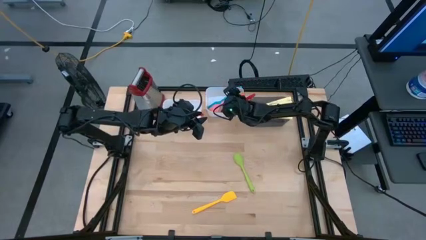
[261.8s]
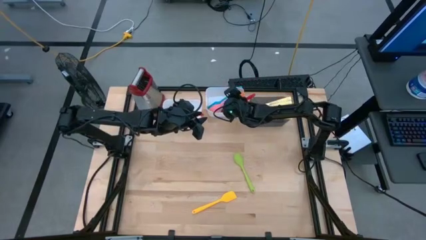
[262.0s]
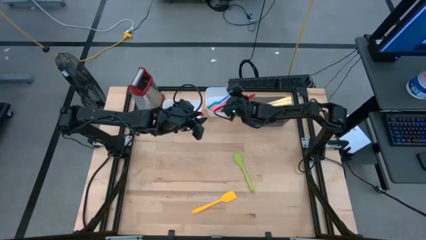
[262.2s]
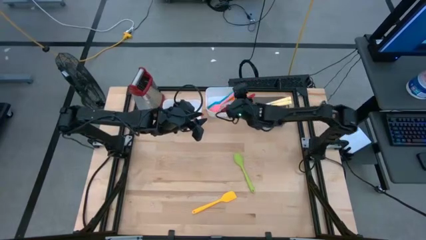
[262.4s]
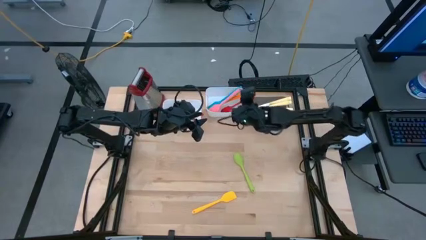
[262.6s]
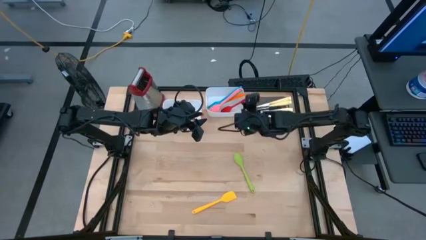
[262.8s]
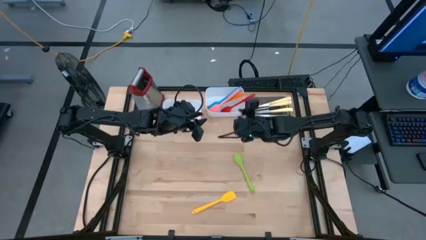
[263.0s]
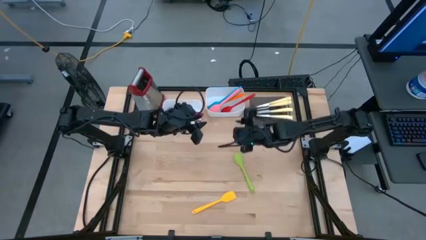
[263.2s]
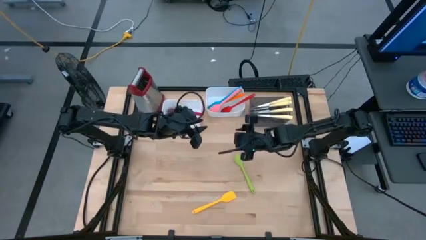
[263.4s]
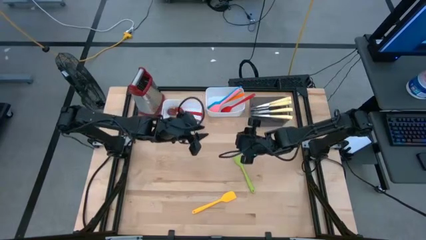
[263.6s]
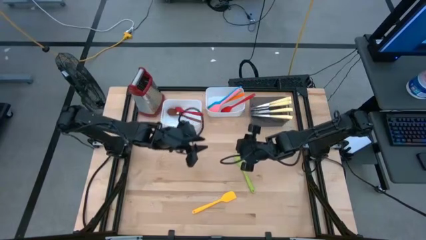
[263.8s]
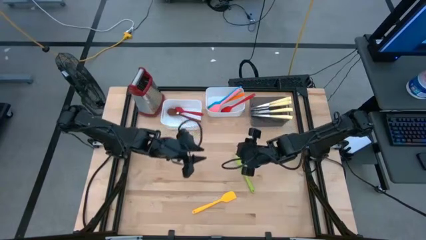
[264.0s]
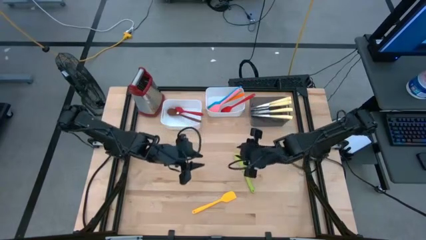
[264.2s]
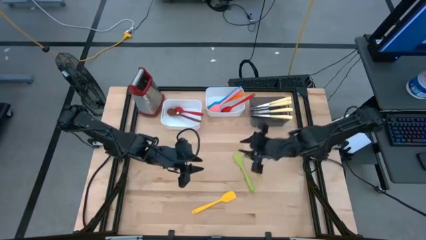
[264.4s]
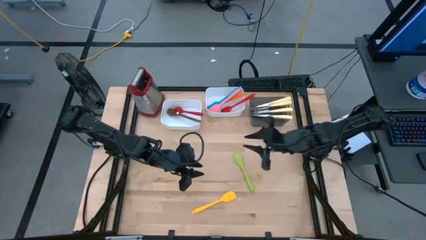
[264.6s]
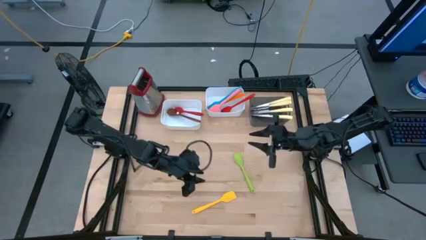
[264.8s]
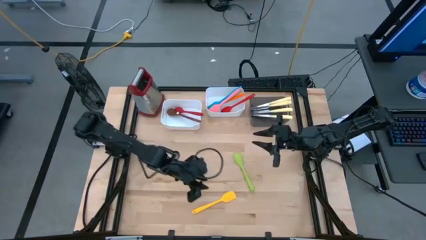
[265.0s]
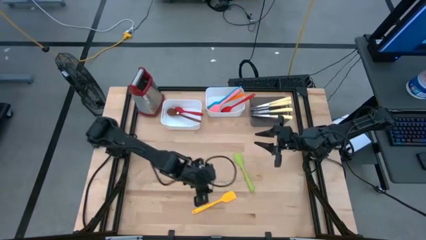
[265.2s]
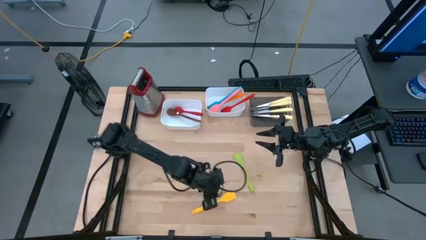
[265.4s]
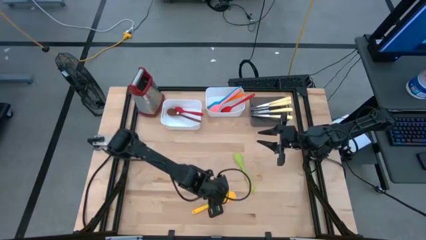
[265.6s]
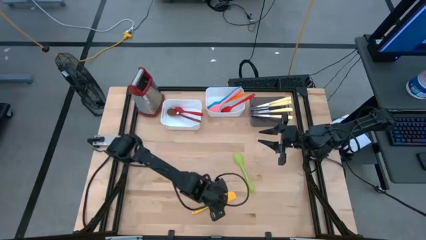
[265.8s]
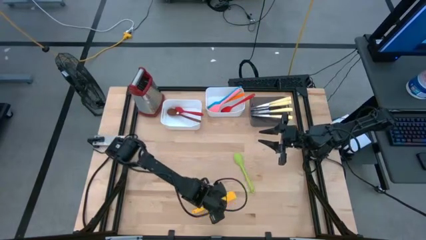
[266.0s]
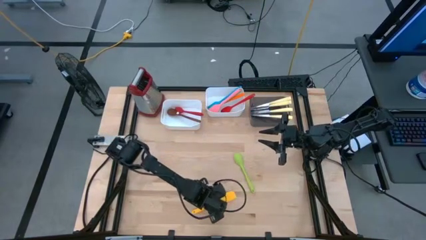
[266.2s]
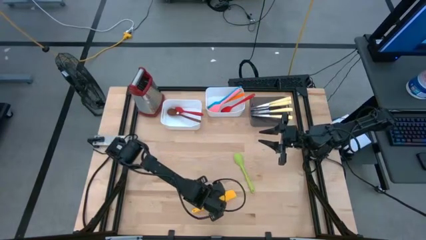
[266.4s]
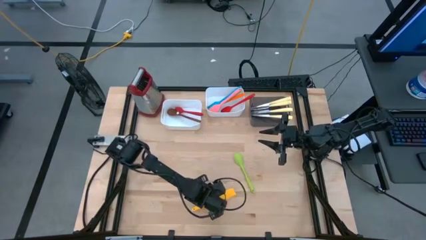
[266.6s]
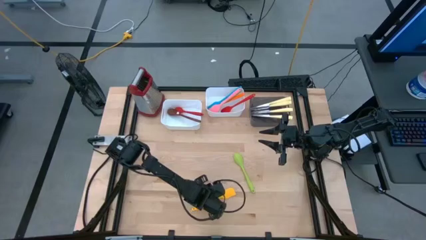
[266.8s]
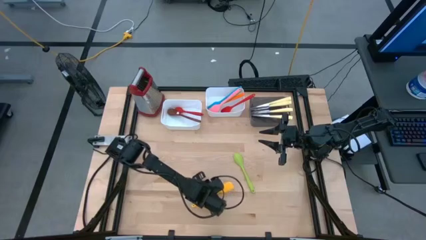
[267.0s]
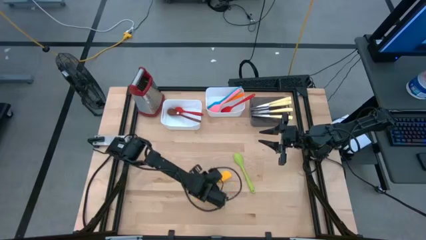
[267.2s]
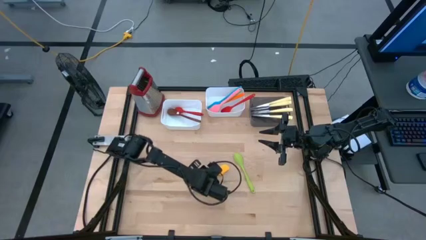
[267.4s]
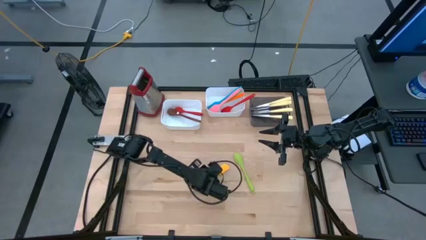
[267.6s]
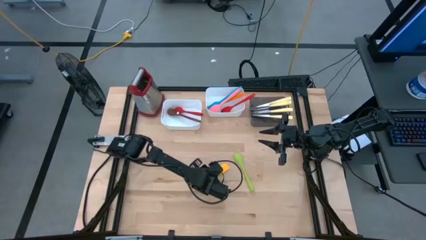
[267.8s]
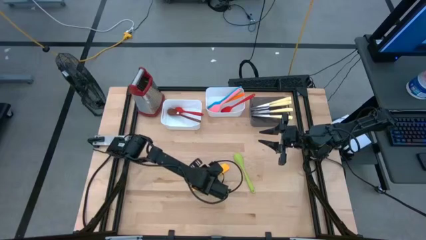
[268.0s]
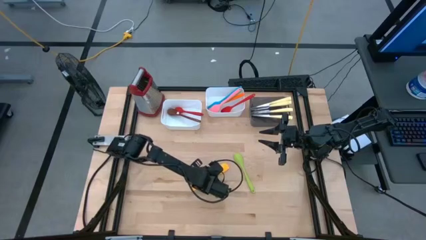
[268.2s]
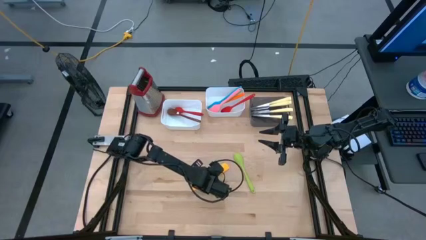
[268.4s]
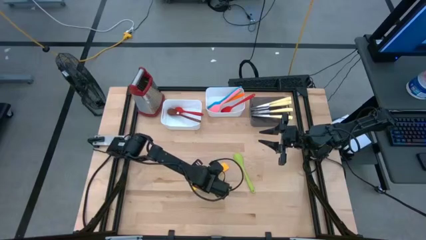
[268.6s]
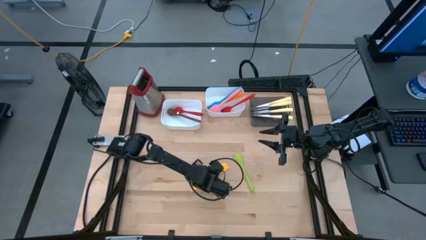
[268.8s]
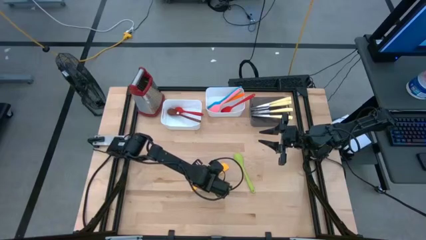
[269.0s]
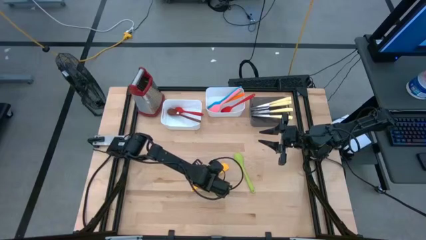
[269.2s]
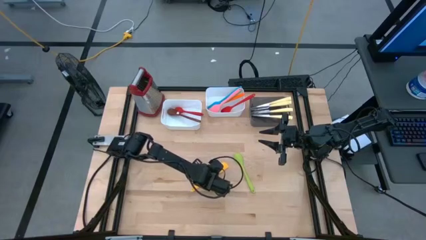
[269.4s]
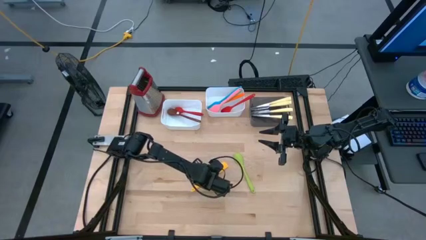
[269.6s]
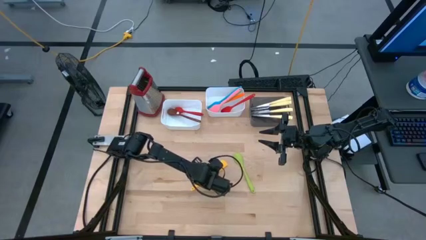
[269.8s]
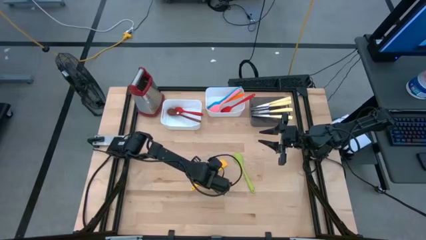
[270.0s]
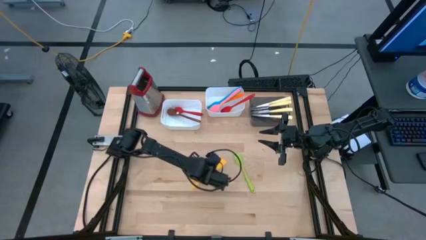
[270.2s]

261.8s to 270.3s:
Task: Pick & Place Kitchen Items
Put the yellow spatula into the right white bin
